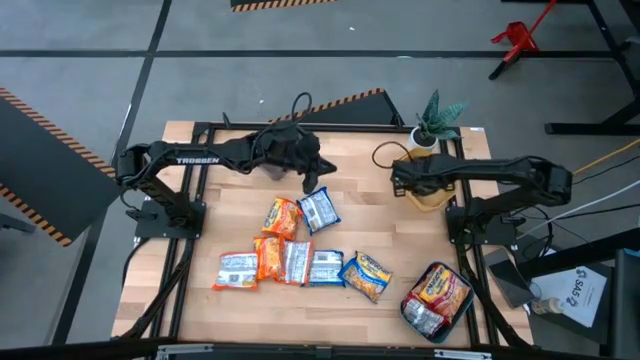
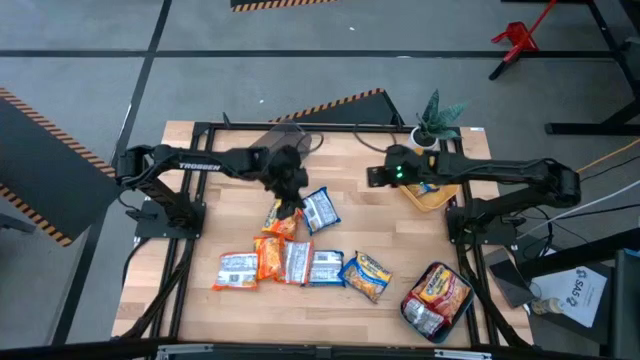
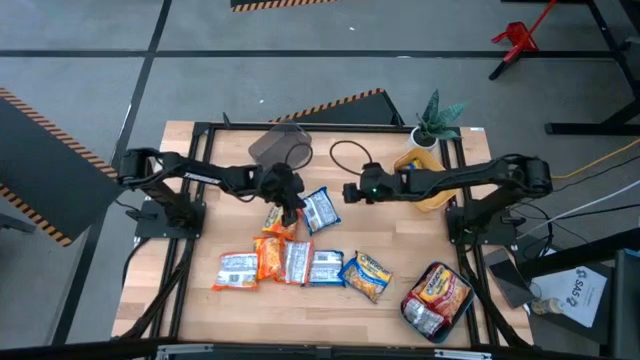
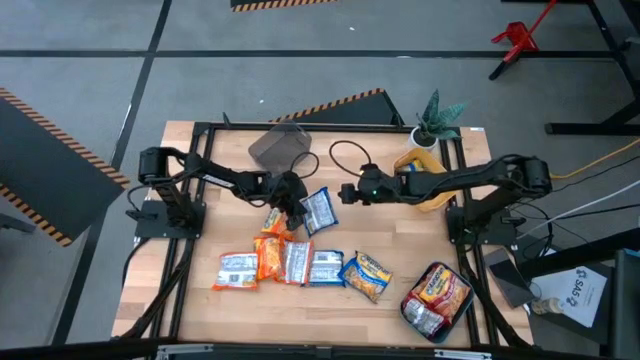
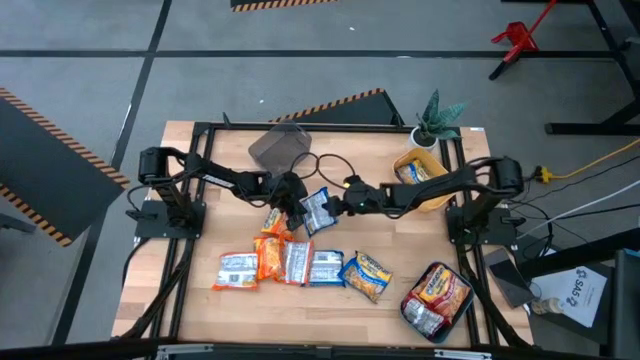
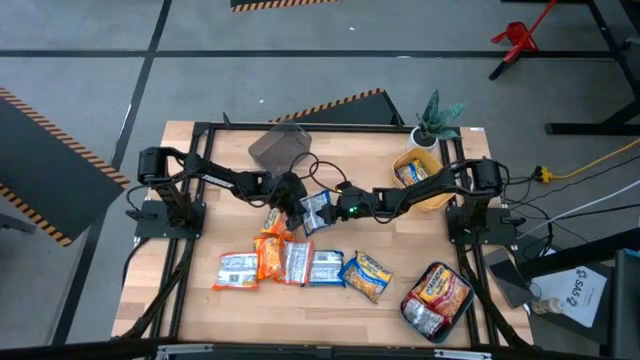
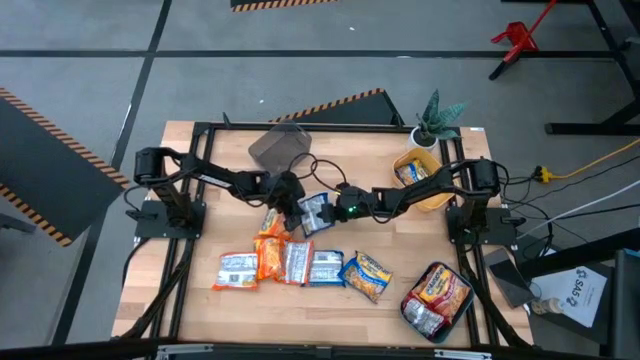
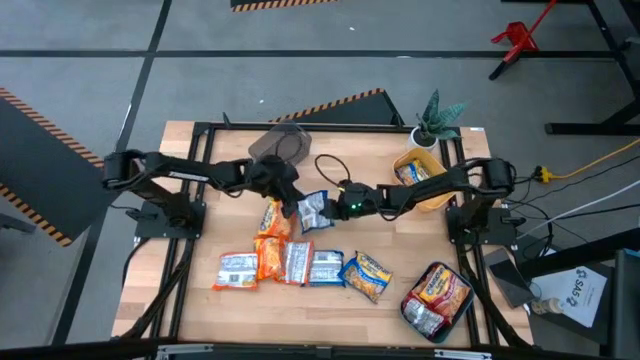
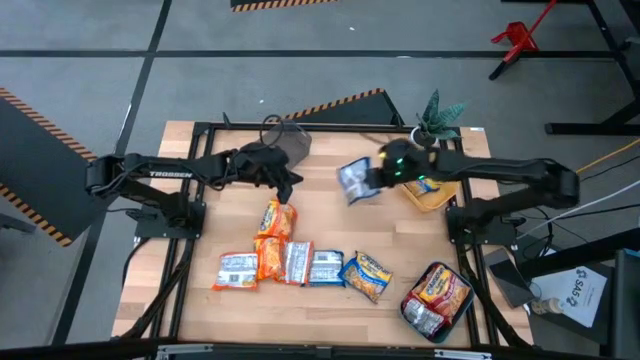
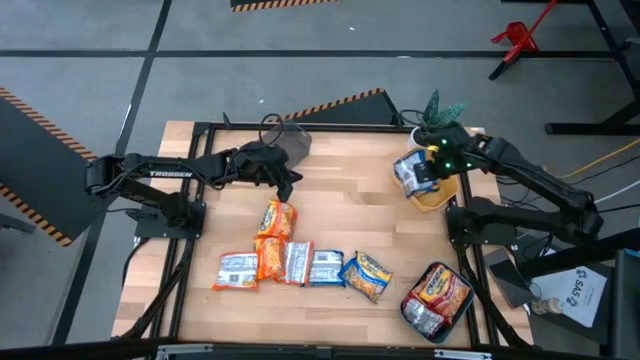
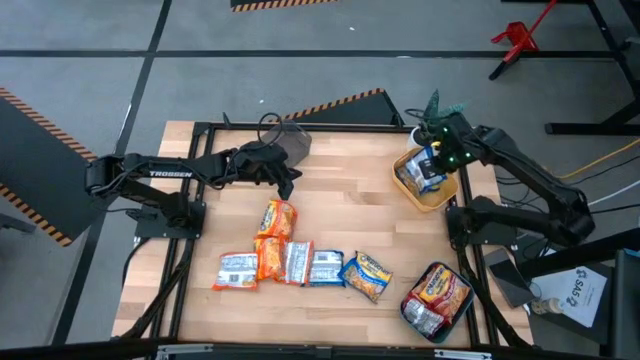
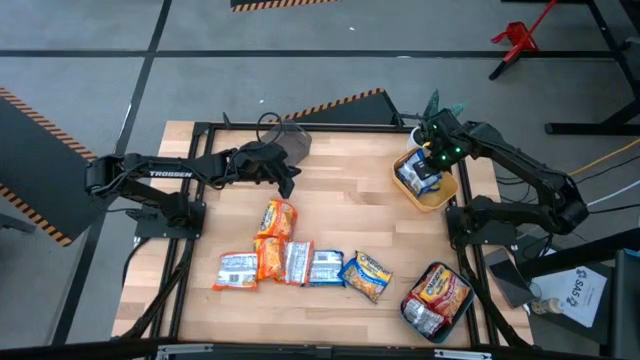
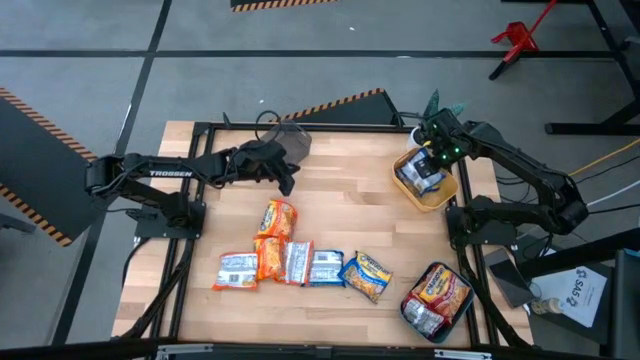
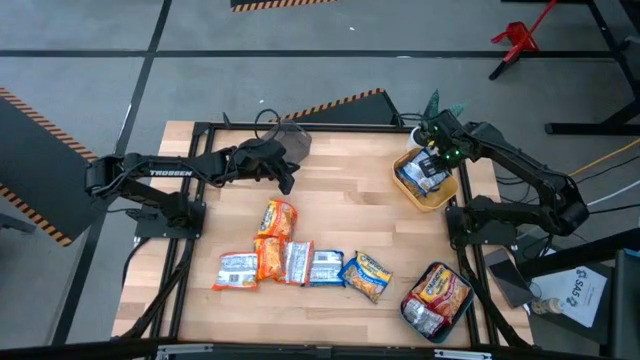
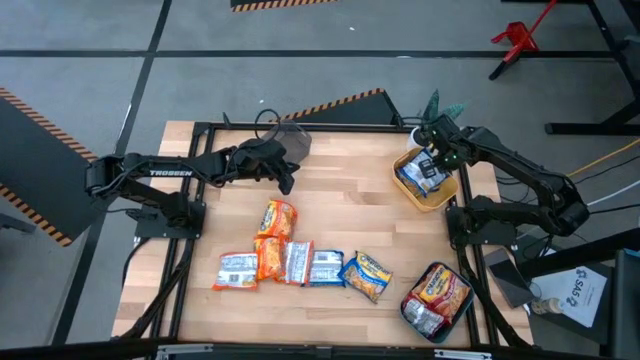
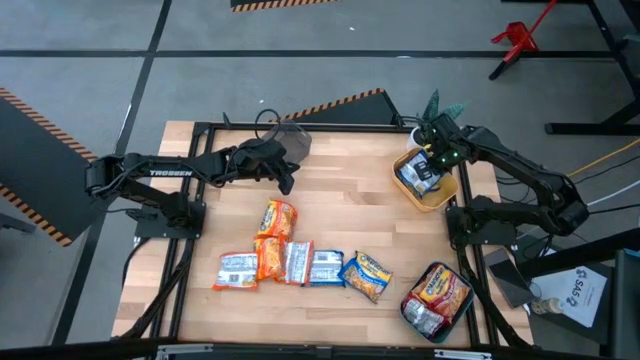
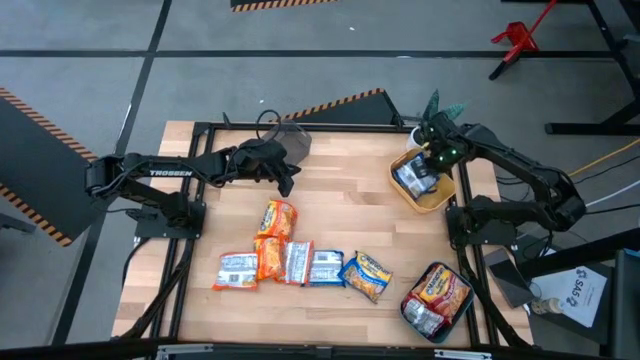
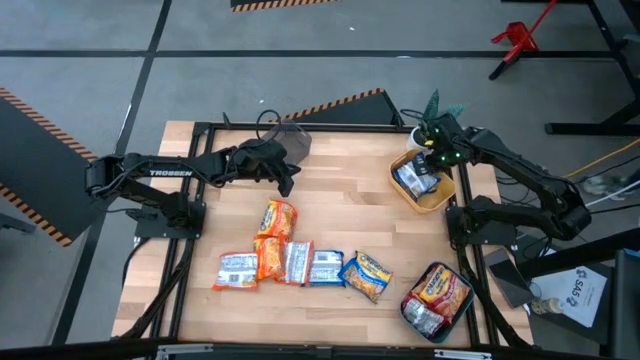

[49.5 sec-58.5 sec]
Task: Sort Maruchan noodles
Put the blue noodle pack into the yellow bin

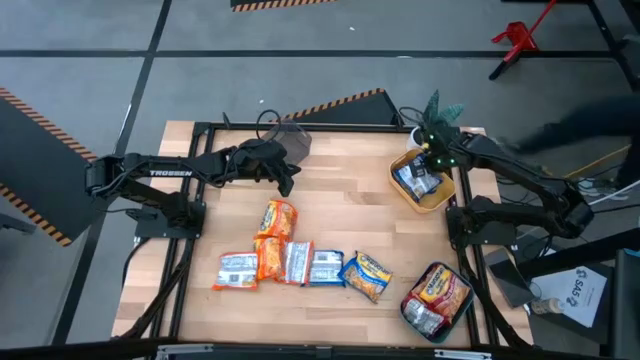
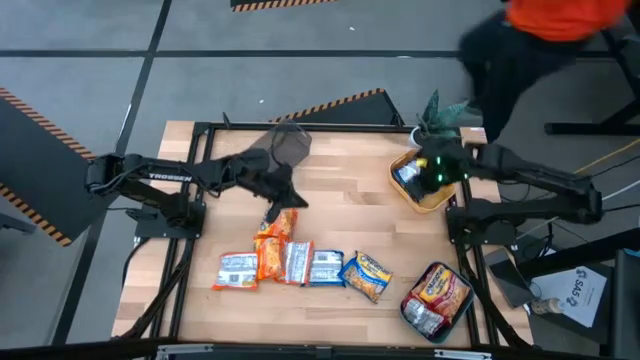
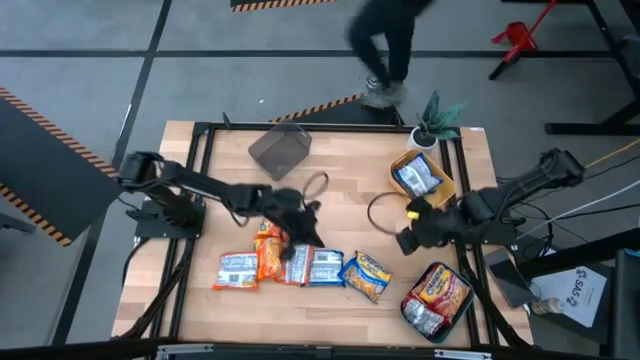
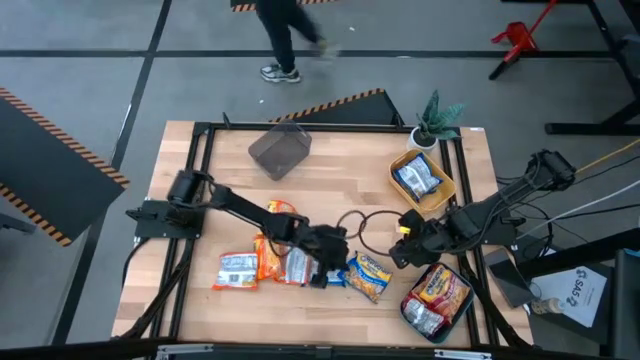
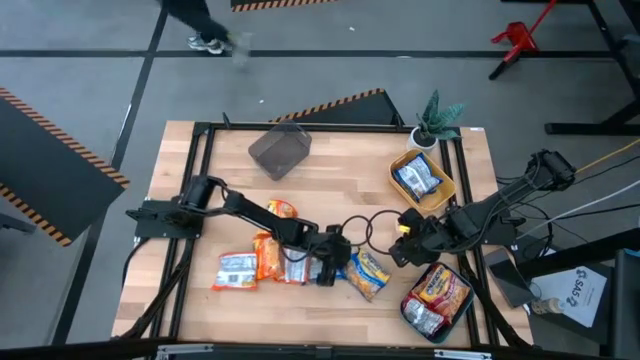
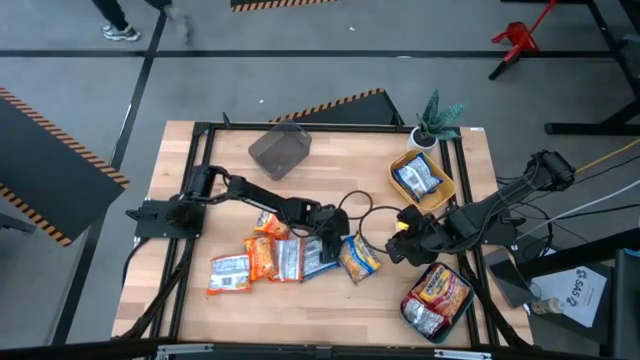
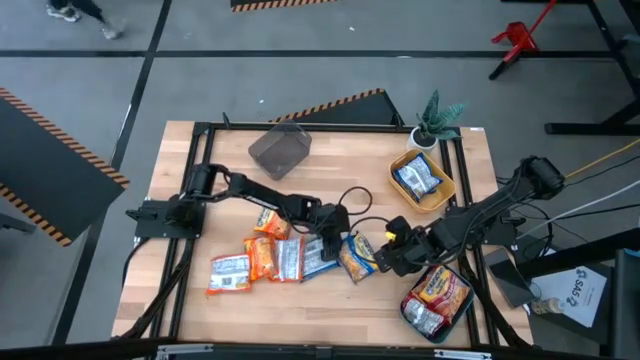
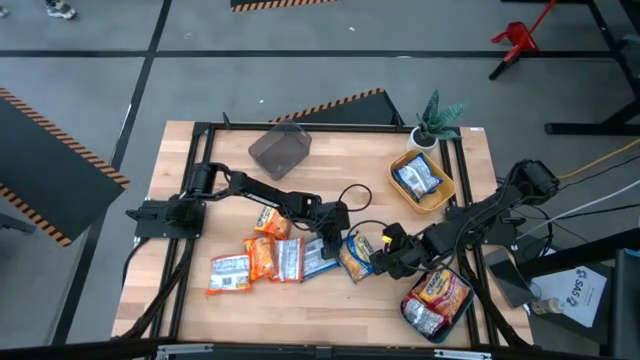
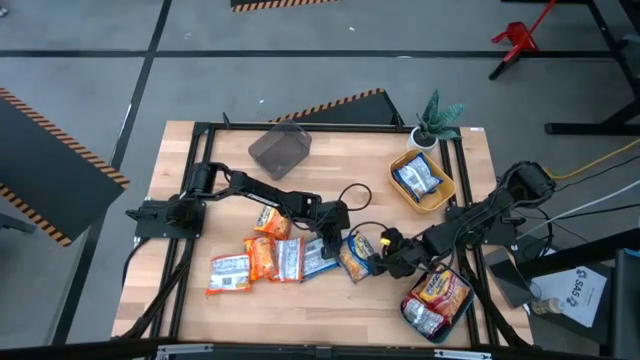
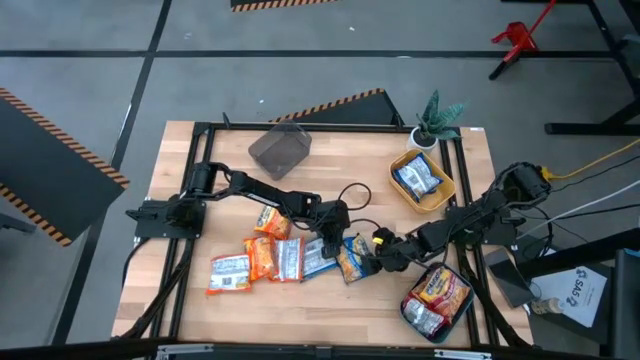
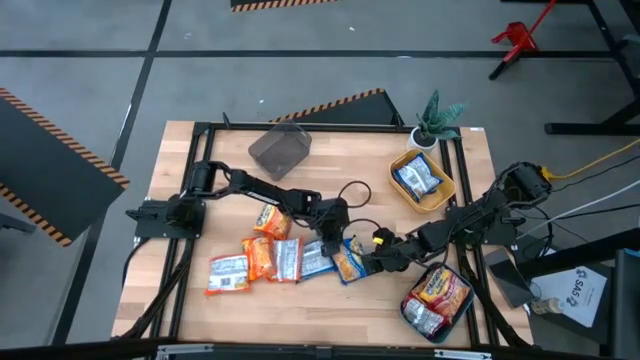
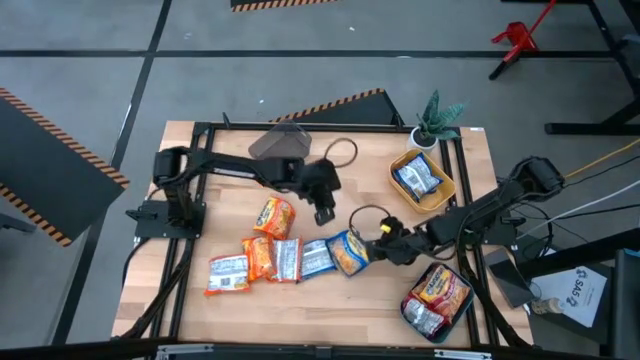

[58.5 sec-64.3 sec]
Put the blue noodle pack into the yellow bin

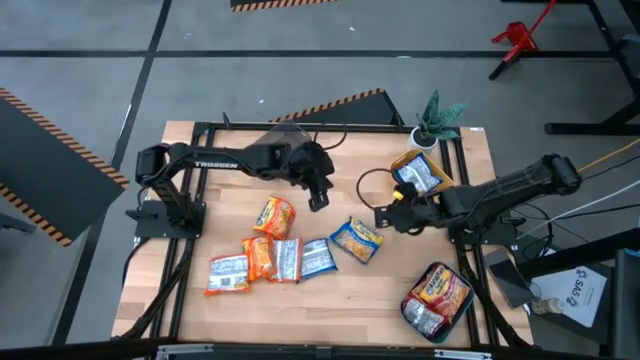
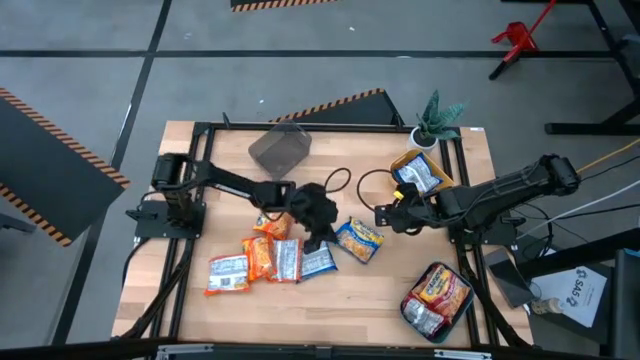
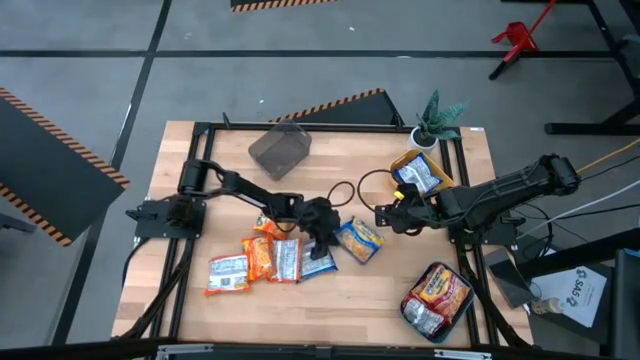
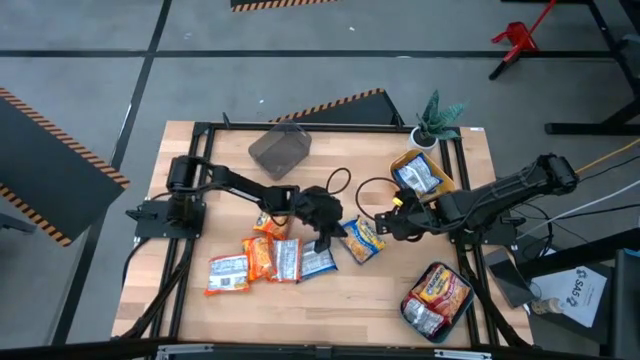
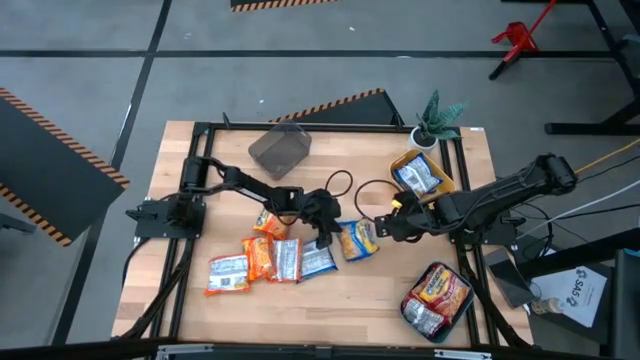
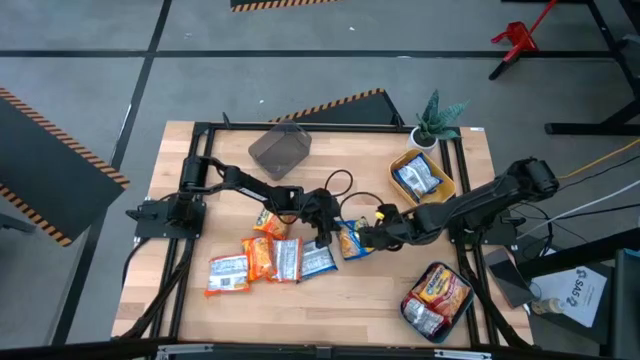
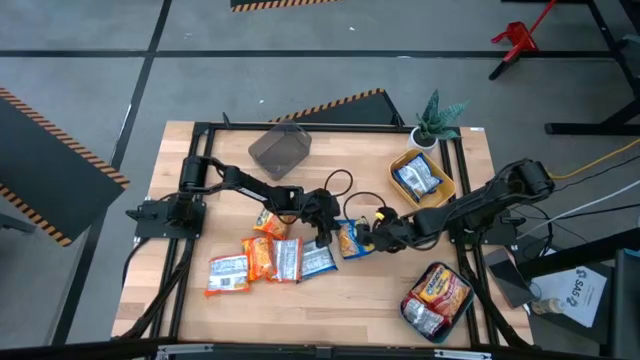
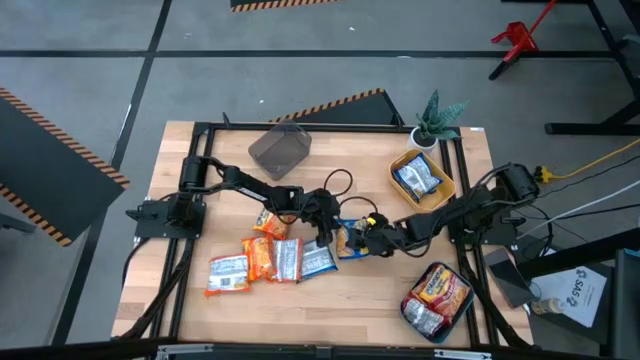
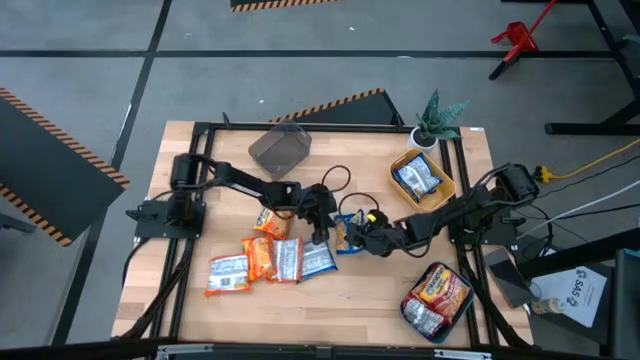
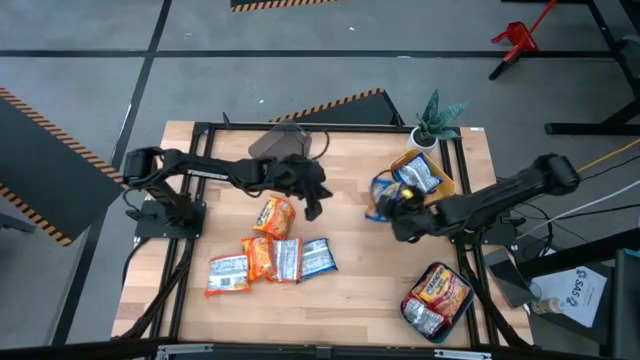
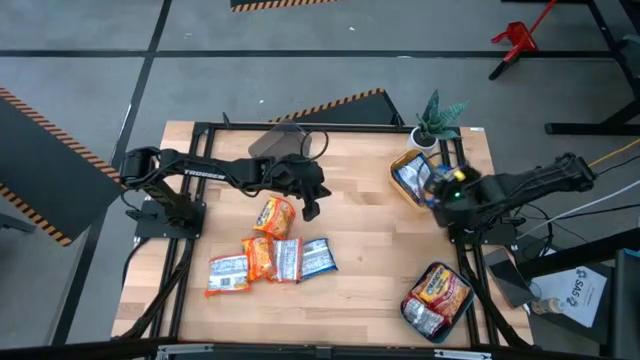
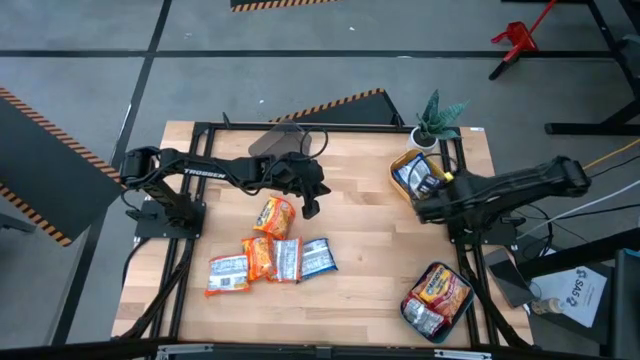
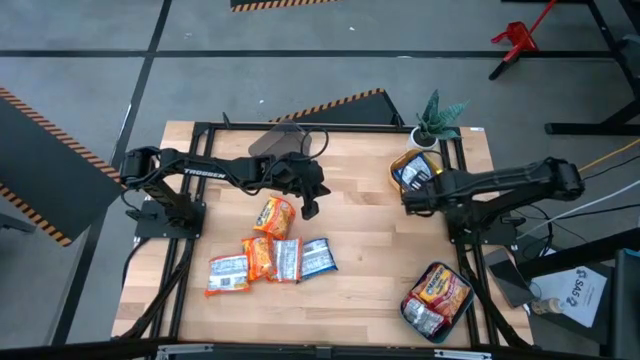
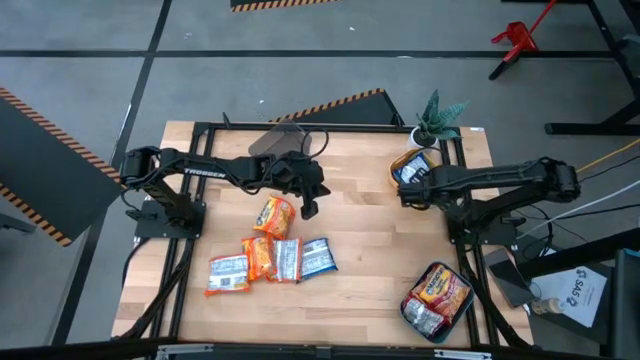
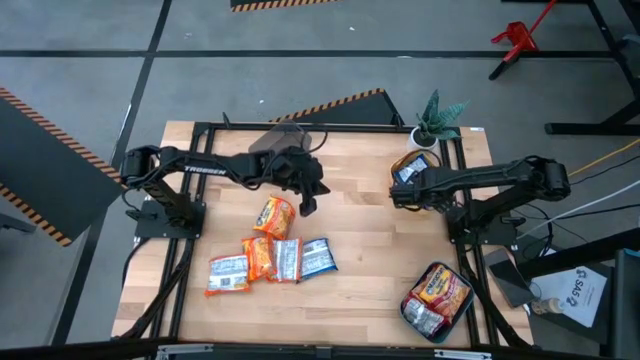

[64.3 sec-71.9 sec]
Put the blue noodle pack into the yellow bin
